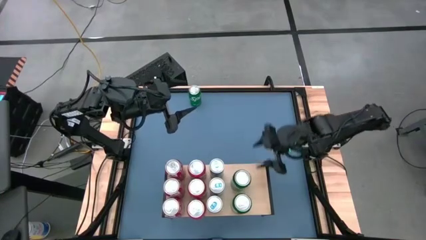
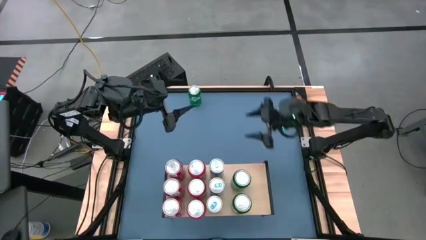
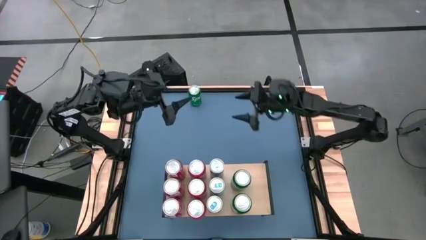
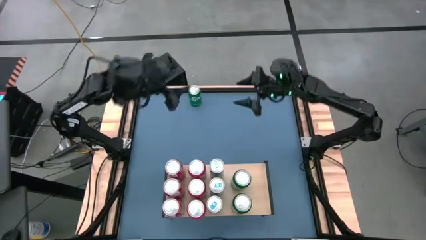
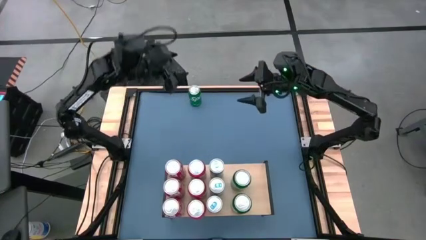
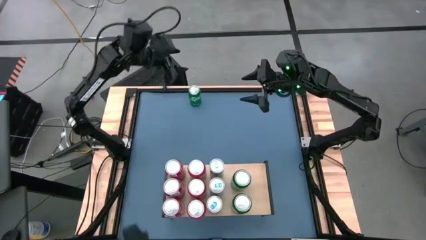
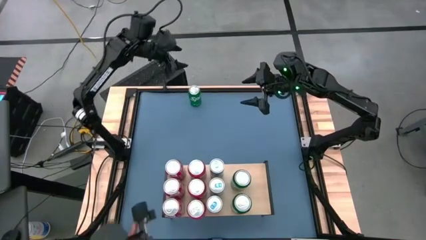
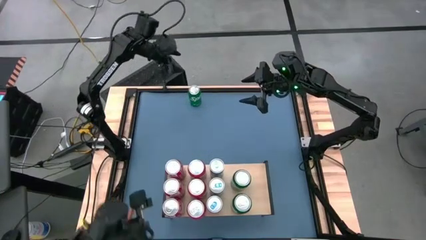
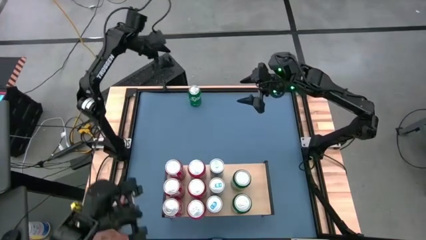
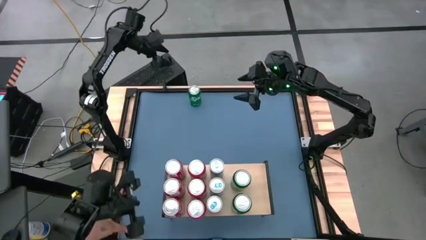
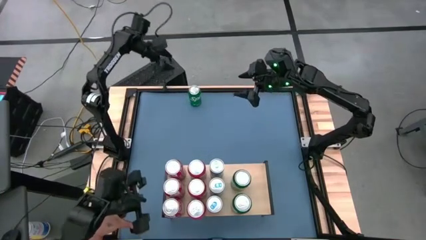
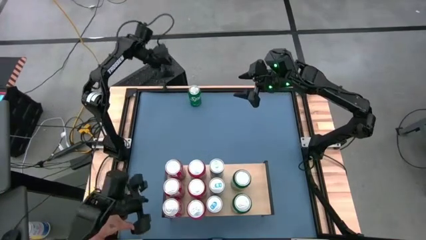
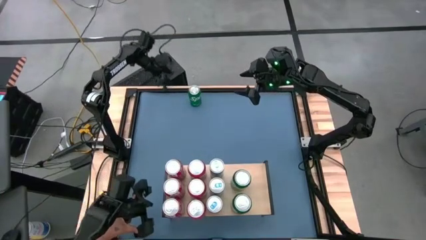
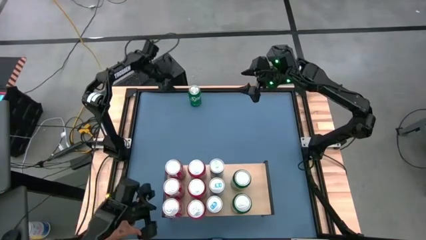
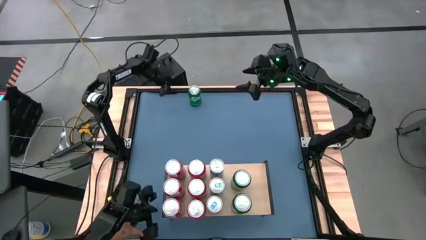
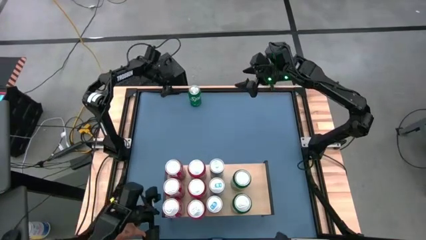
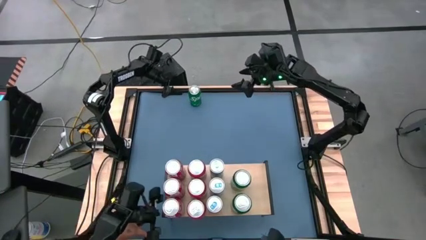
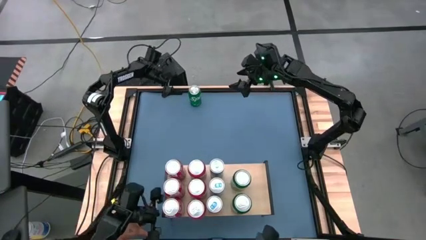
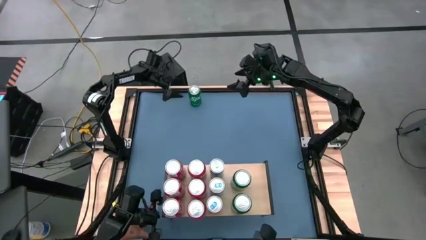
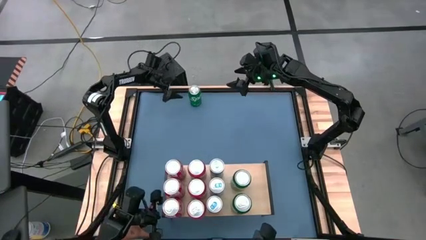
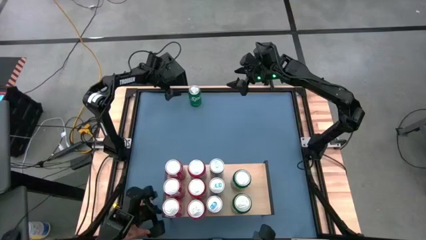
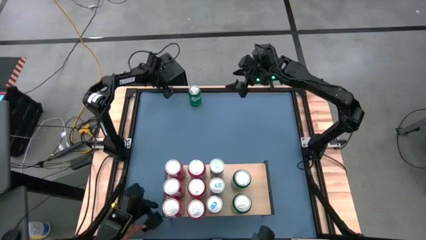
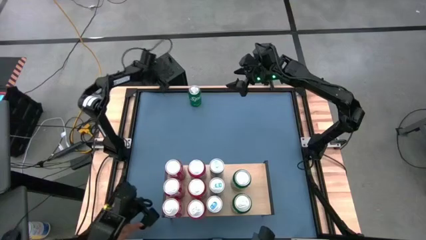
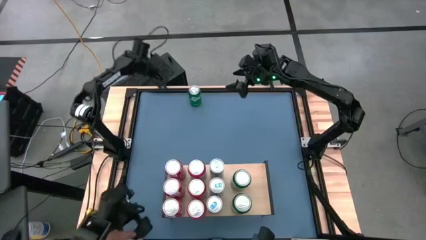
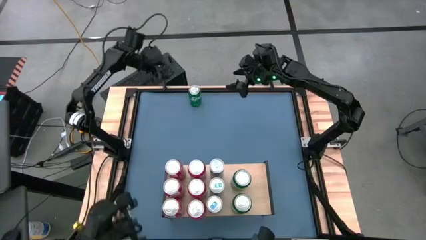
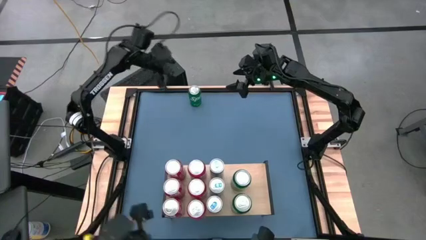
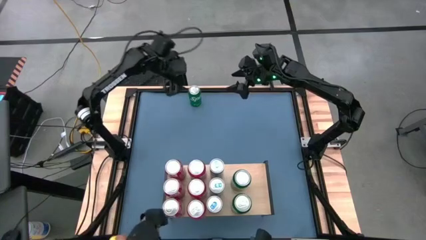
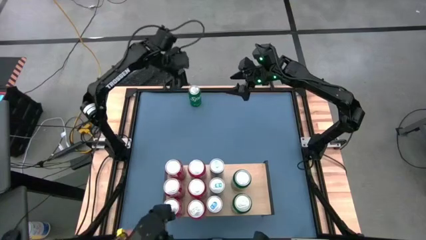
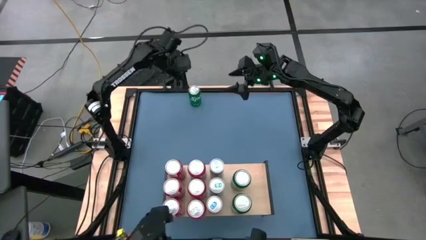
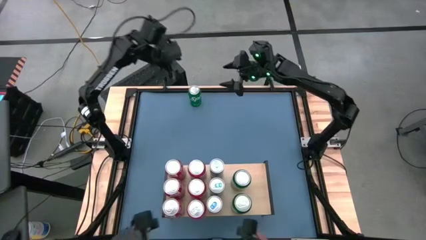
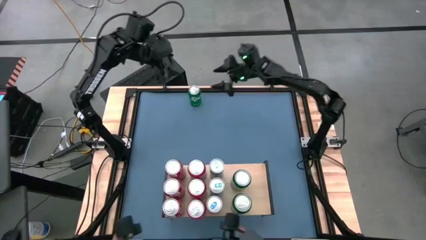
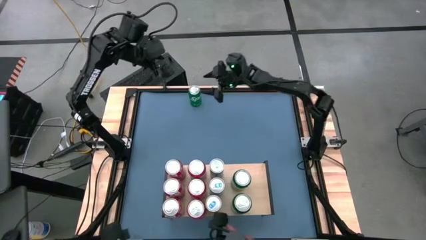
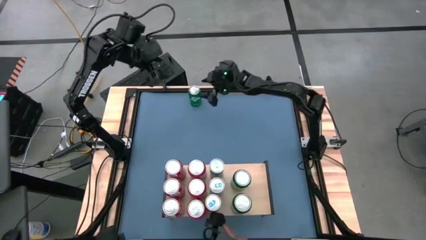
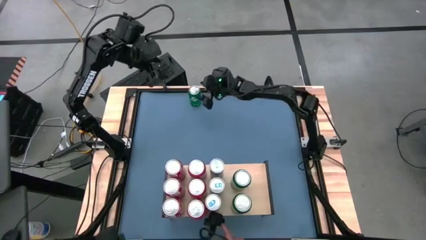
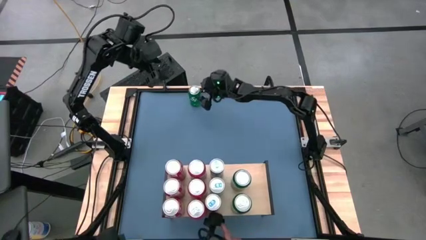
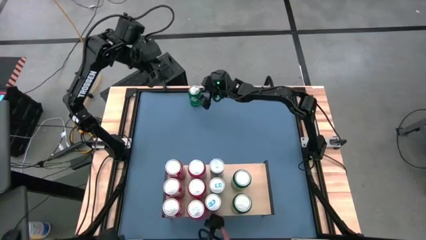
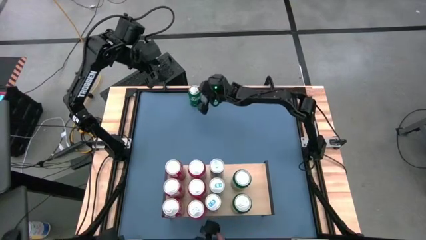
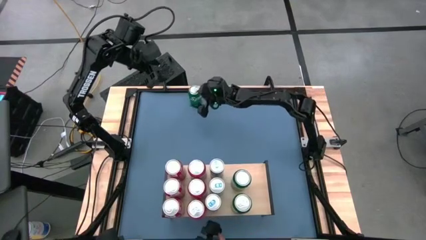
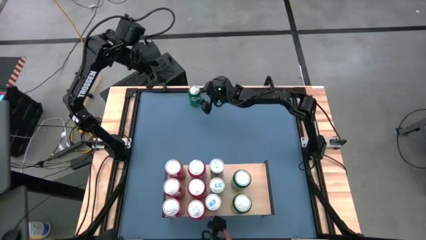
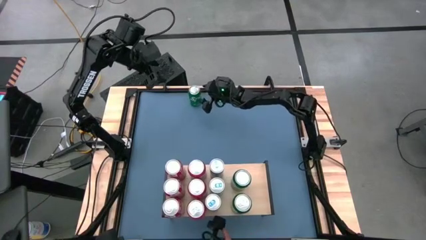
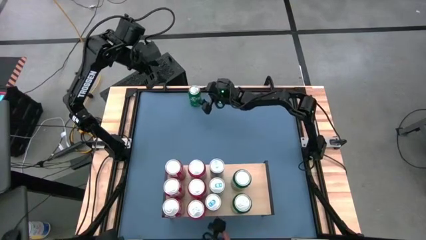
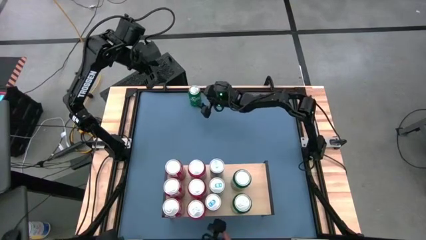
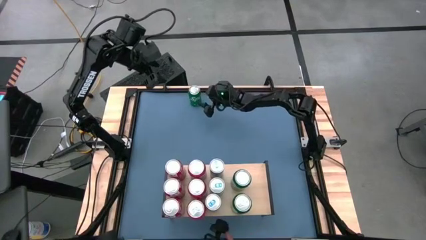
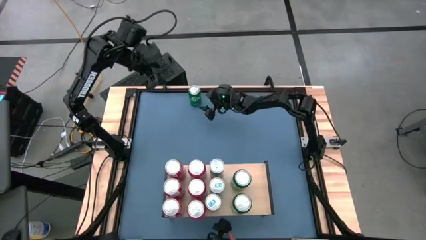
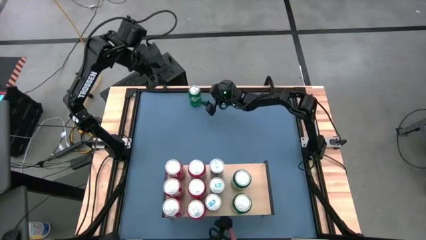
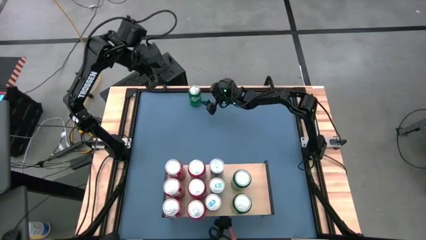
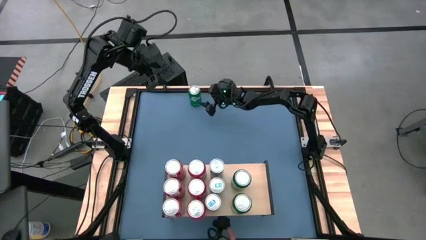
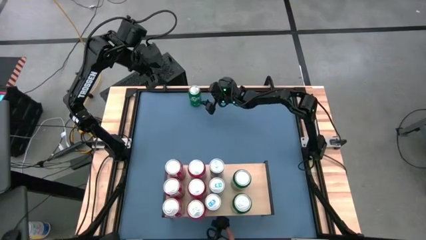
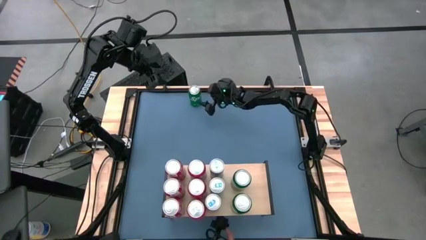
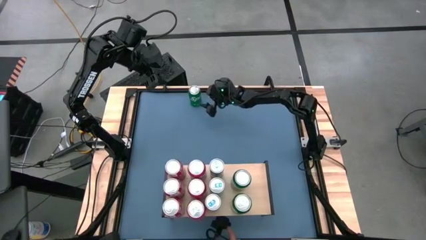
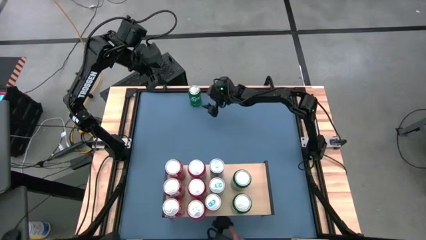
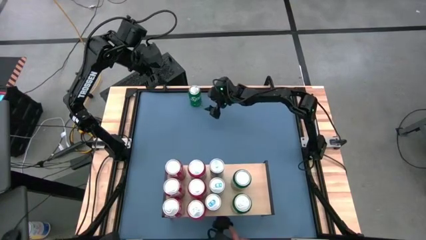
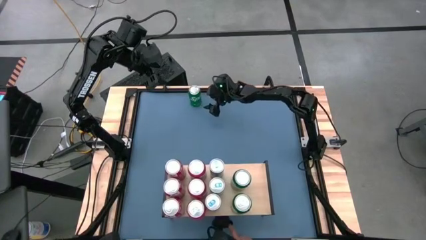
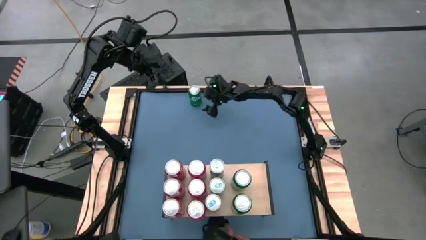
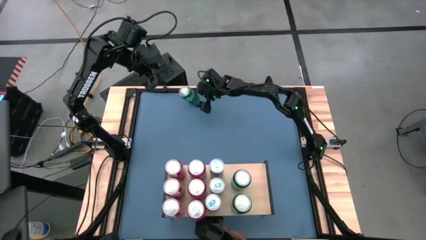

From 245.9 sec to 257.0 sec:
Task: Place canned beverage on shelf
Put the green soda can on the shelf aligned with the other green soda cans
